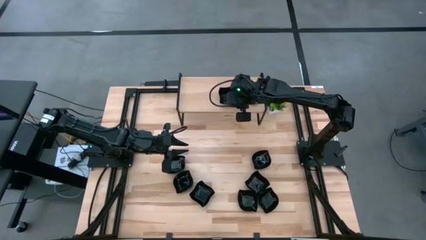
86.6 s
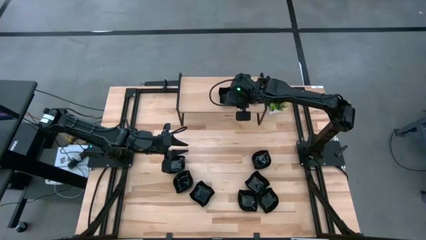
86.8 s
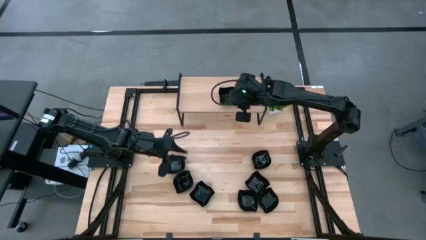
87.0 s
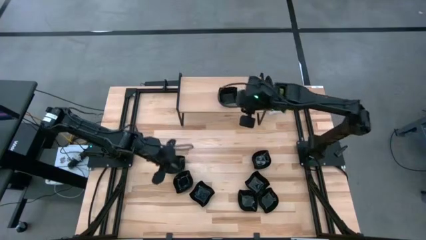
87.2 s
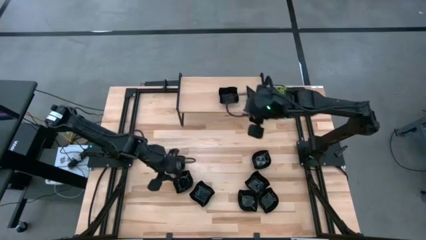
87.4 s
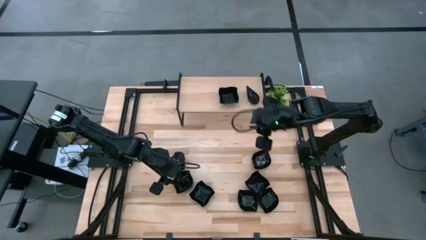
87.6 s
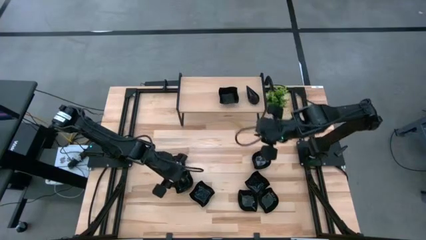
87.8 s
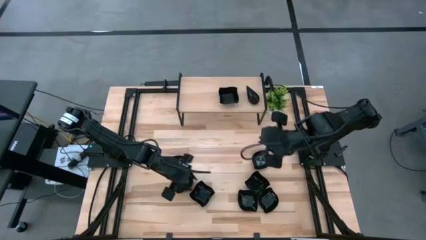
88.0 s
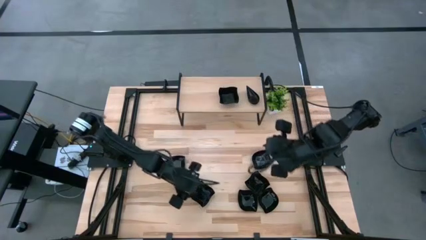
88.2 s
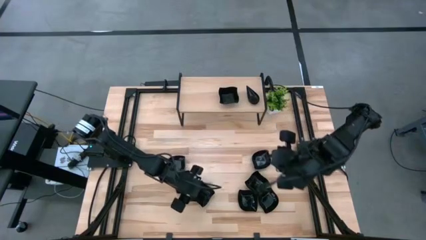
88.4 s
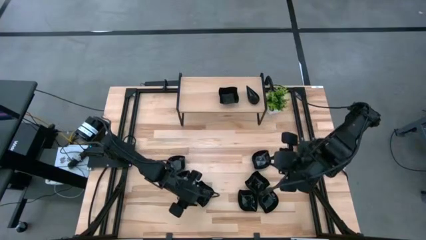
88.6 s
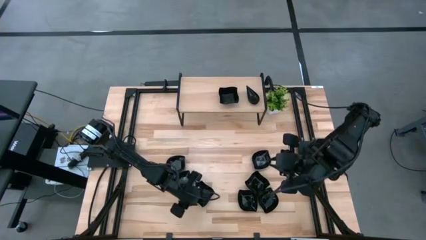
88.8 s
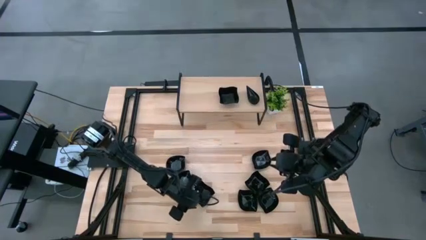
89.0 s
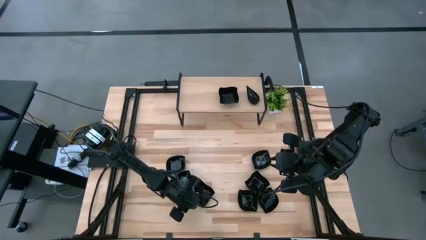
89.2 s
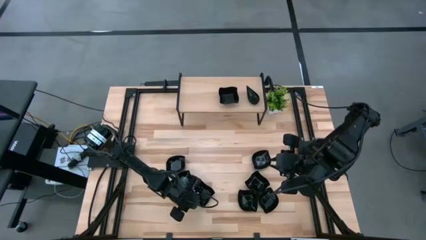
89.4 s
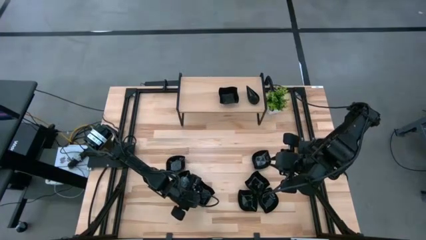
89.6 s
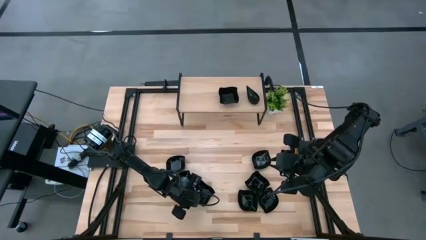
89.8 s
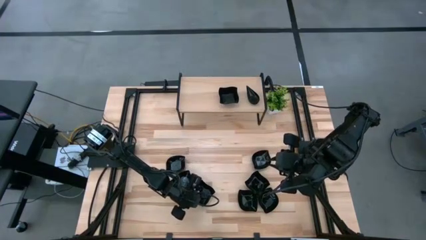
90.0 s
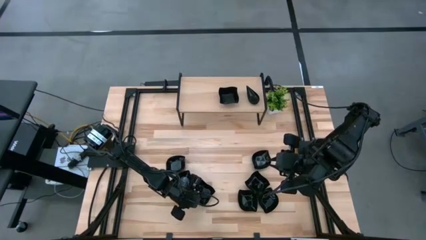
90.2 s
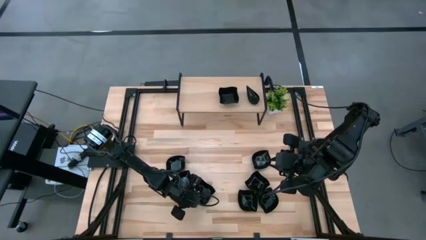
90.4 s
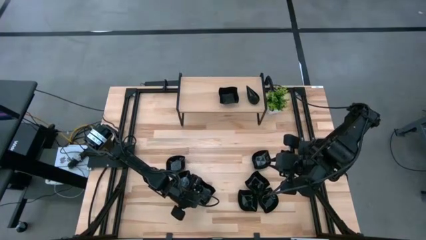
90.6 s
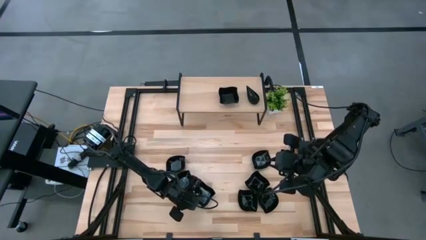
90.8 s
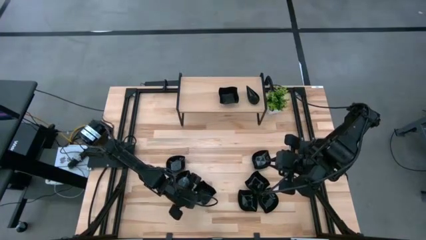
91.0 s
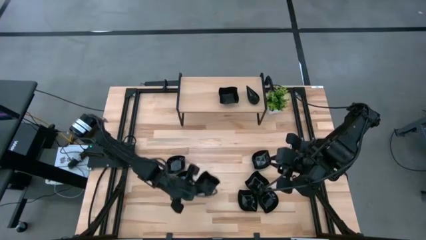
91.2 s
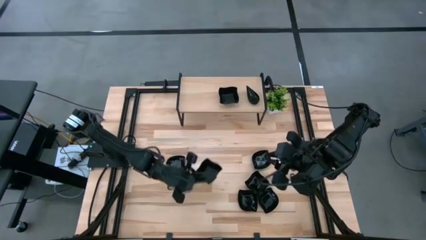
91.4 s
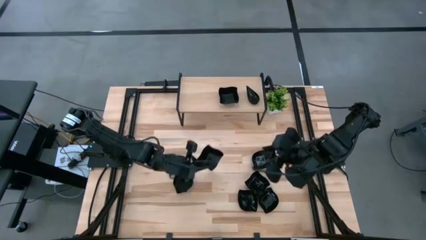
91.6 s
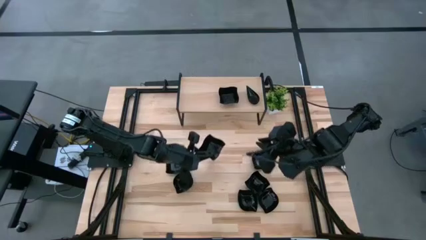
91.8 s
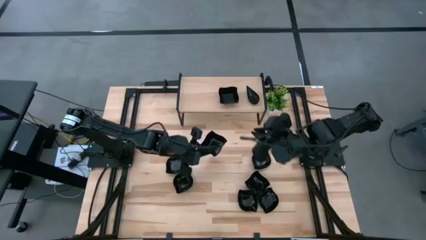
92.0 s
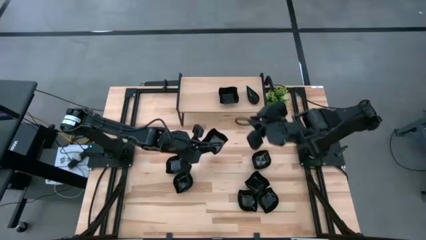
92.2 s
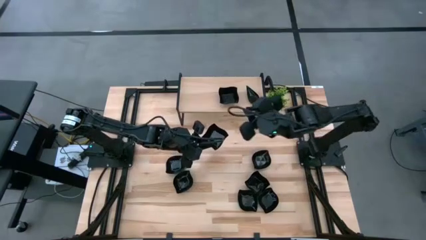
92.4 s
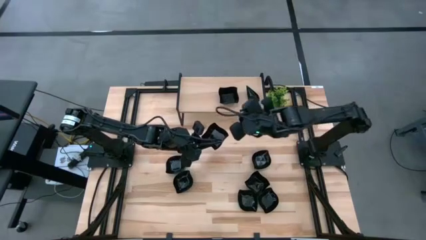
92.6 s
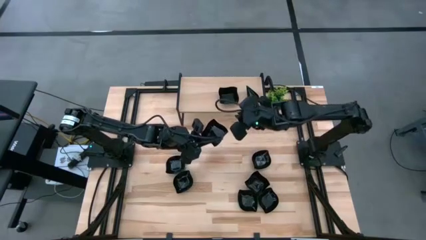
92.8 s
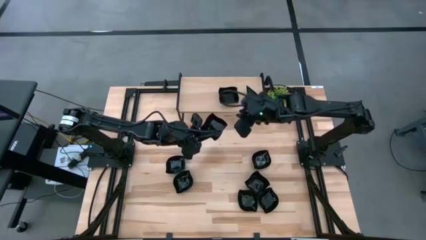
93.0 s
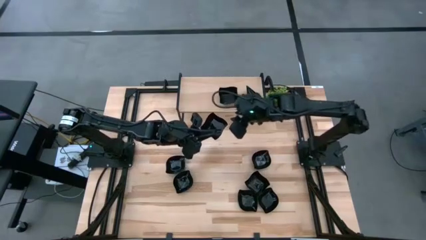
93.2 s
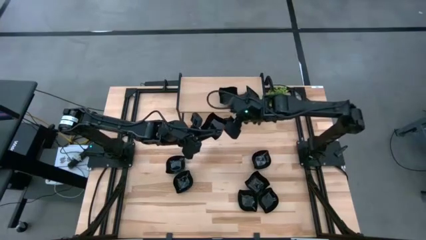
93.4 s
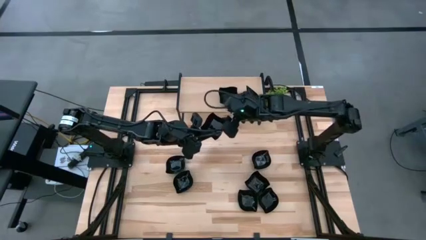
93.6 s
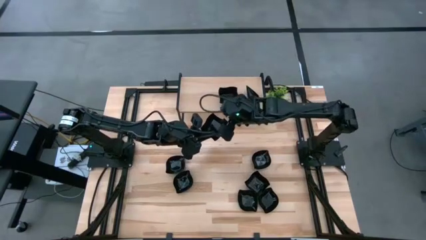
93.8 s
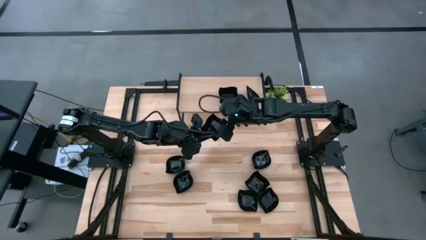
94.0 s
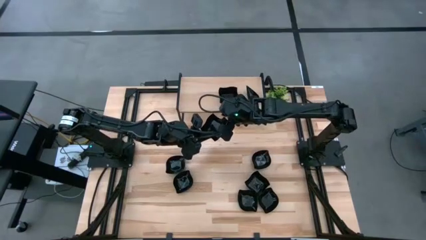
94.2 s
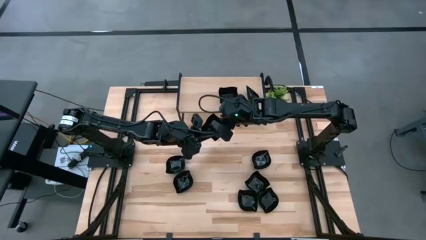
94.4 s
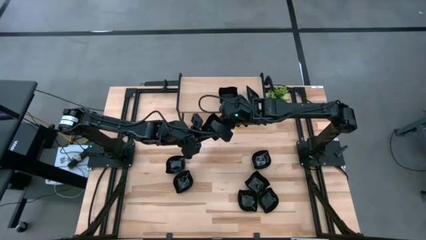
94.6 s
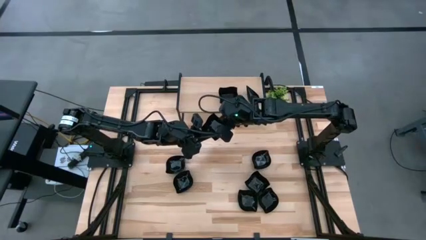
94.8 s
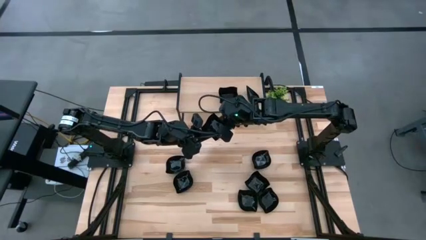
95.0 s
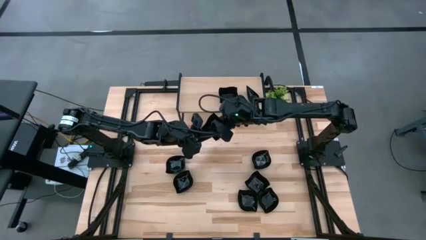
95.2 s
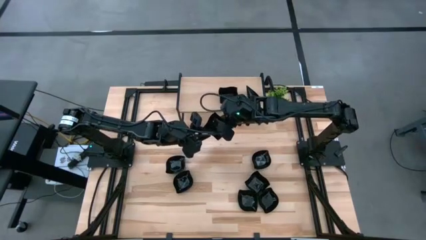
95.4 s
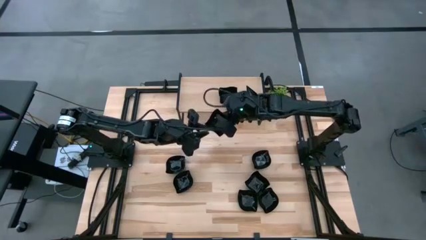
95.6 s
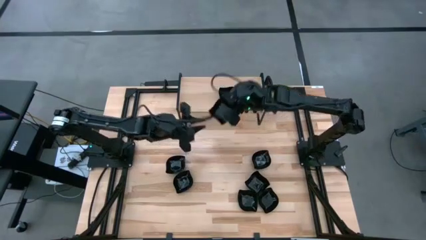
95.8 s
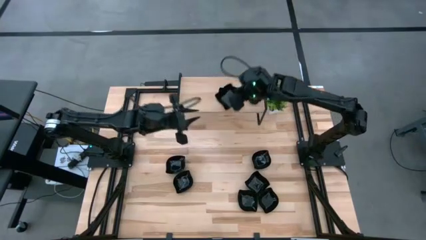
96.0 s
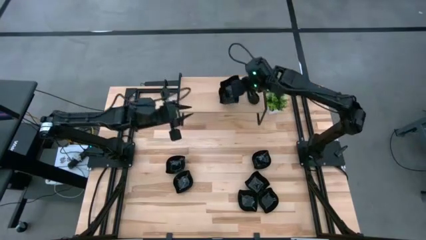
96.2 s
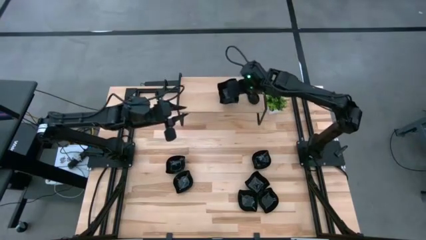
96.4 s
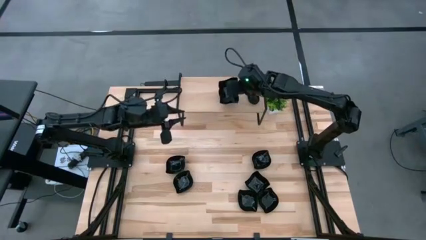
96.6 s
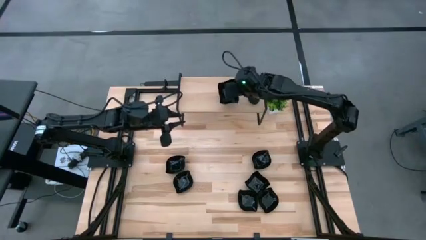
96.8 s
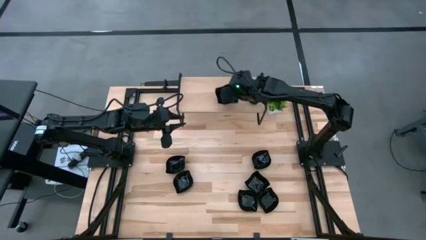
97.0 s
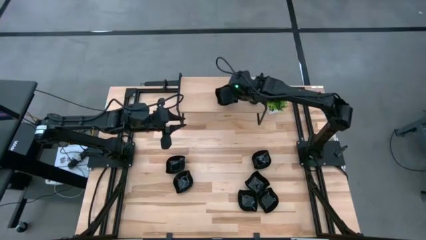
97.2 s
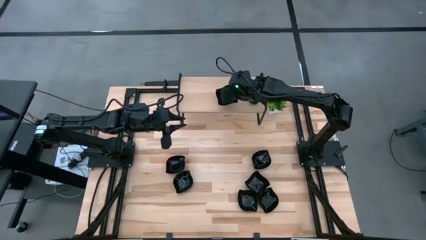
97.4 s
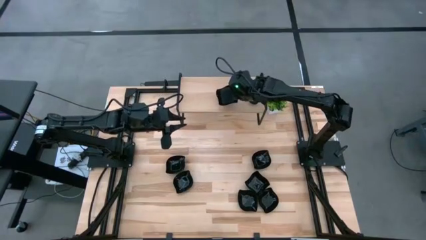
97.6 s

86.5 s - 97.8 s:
Task: Pick & Place Mini shaped plates
Stack the black distorted square plate on top of the black distorted square plate on the shelf
